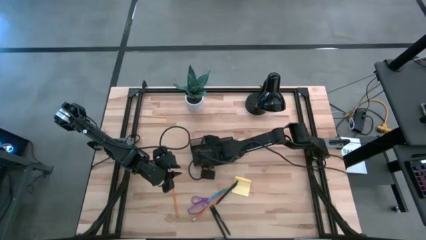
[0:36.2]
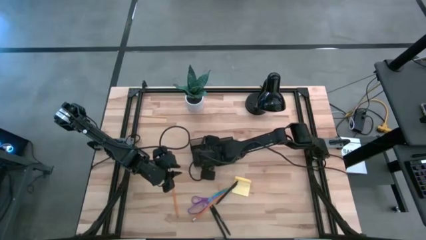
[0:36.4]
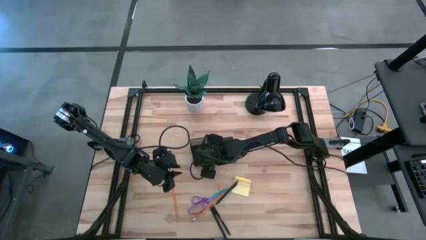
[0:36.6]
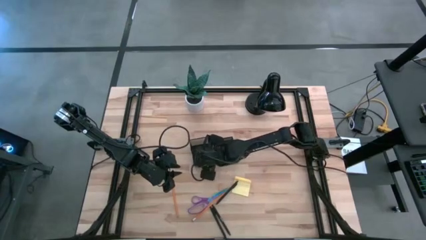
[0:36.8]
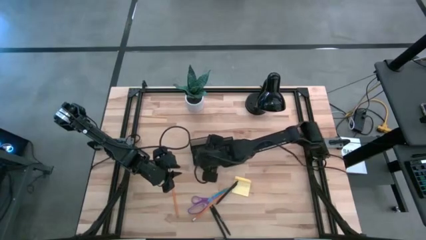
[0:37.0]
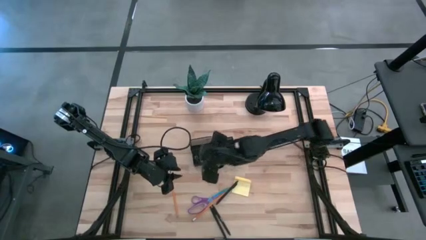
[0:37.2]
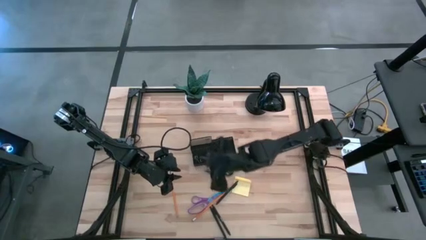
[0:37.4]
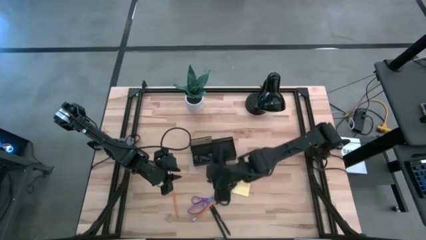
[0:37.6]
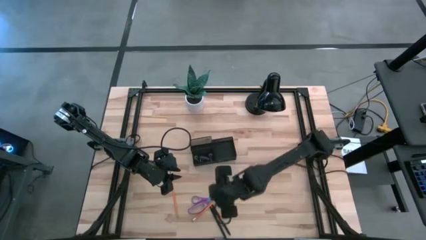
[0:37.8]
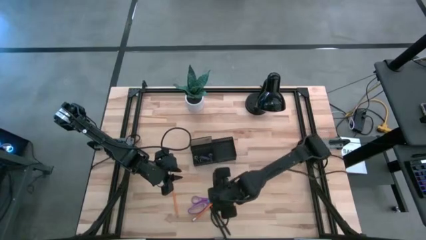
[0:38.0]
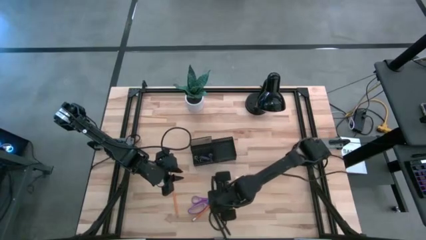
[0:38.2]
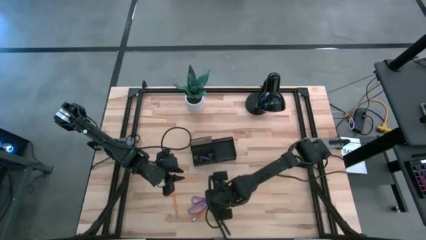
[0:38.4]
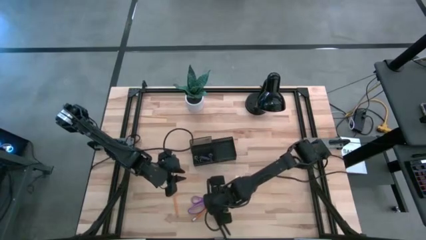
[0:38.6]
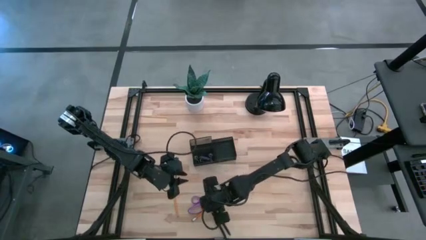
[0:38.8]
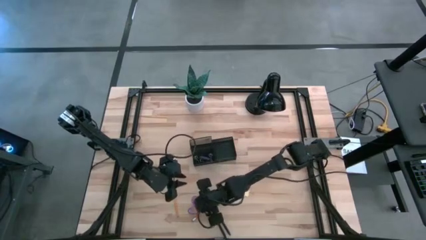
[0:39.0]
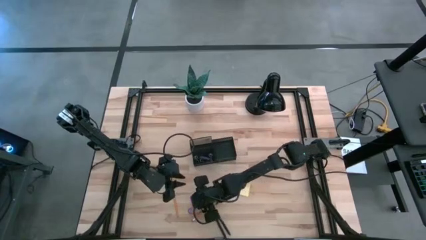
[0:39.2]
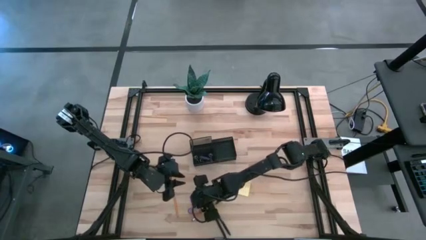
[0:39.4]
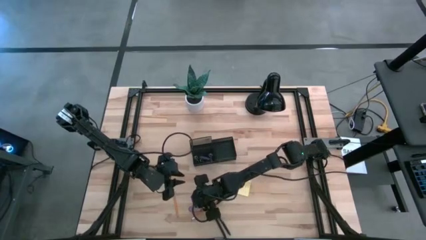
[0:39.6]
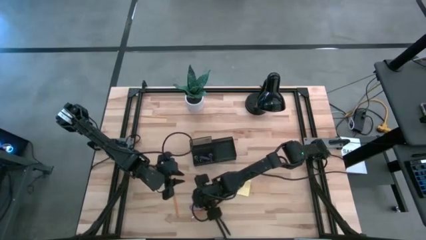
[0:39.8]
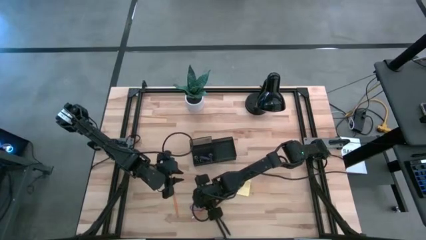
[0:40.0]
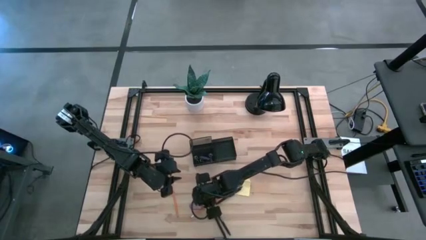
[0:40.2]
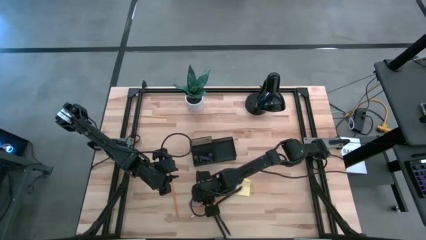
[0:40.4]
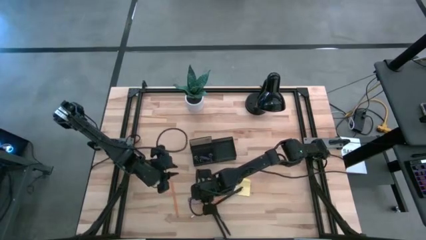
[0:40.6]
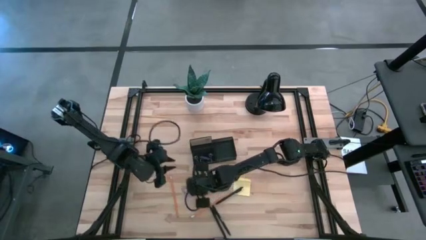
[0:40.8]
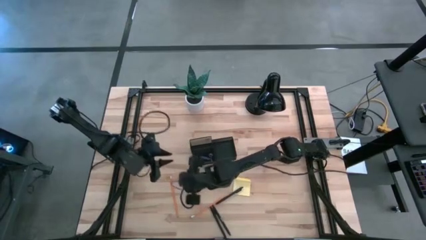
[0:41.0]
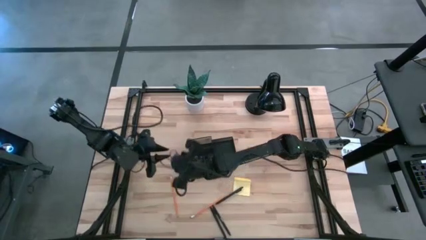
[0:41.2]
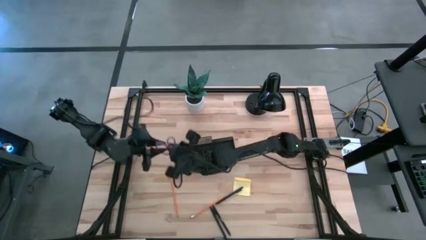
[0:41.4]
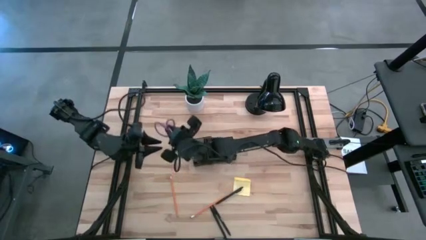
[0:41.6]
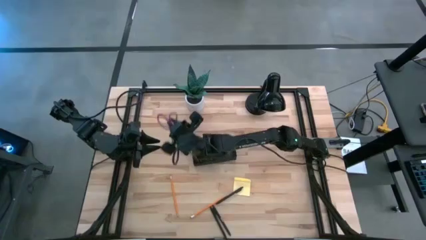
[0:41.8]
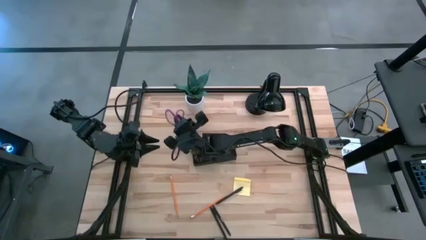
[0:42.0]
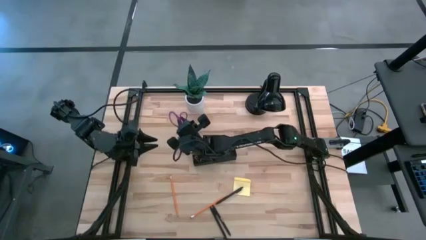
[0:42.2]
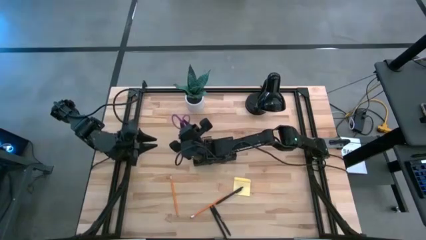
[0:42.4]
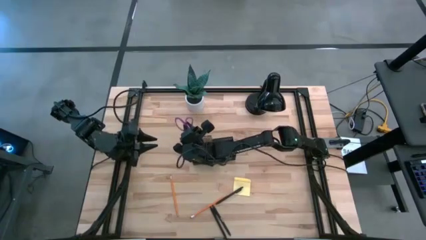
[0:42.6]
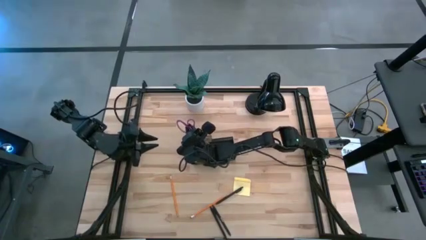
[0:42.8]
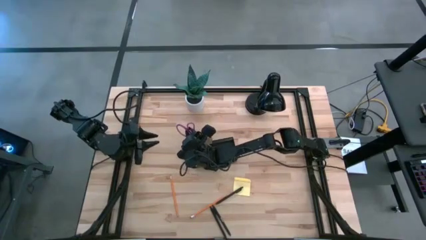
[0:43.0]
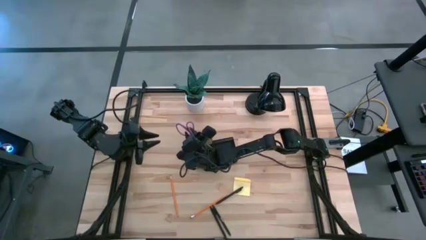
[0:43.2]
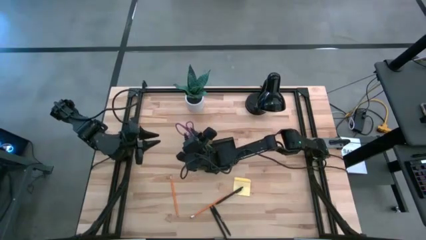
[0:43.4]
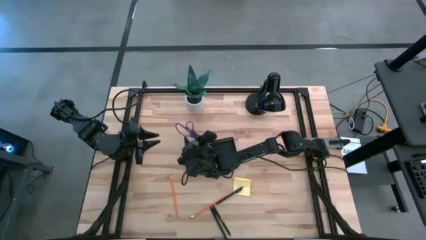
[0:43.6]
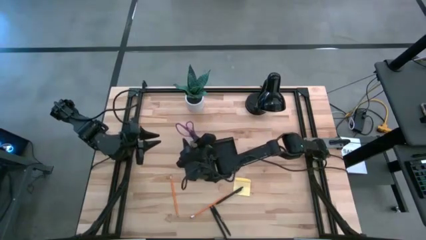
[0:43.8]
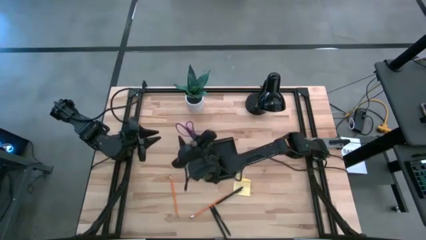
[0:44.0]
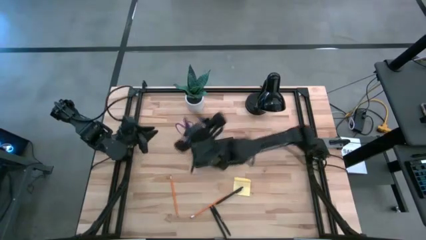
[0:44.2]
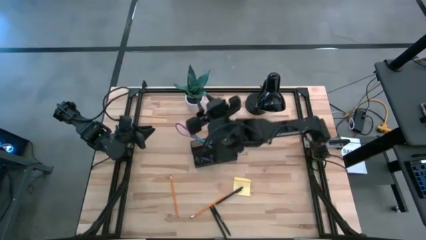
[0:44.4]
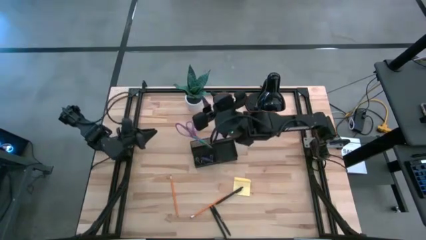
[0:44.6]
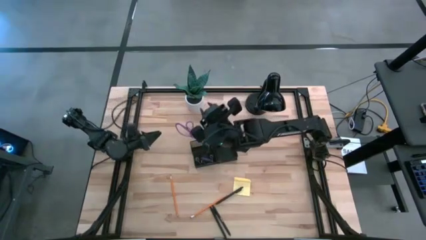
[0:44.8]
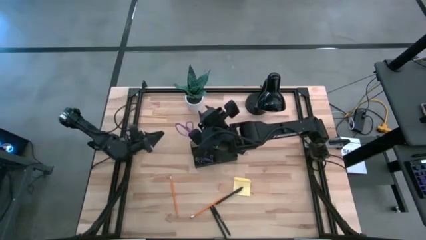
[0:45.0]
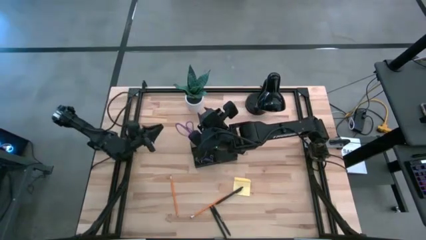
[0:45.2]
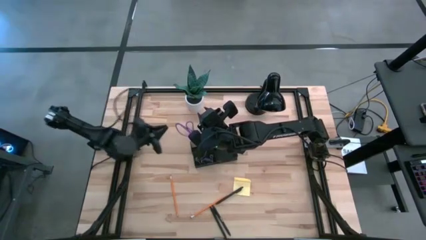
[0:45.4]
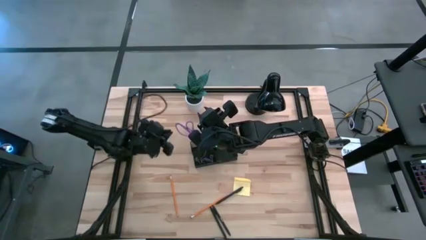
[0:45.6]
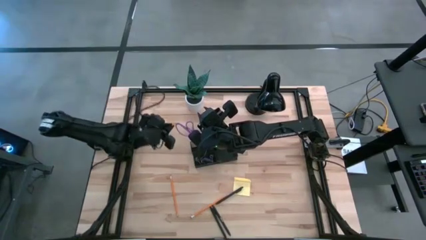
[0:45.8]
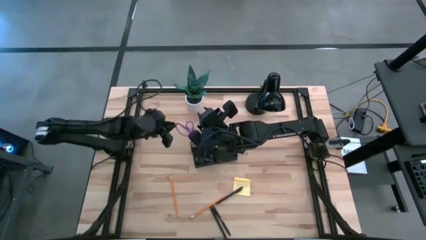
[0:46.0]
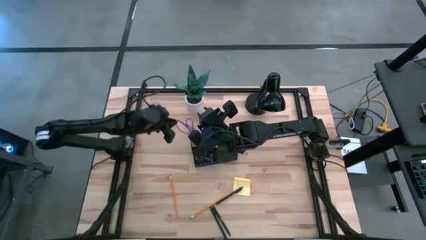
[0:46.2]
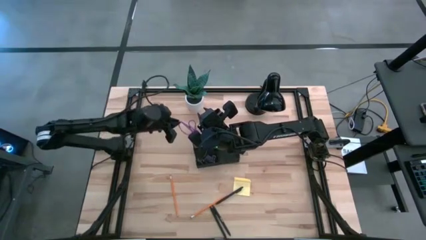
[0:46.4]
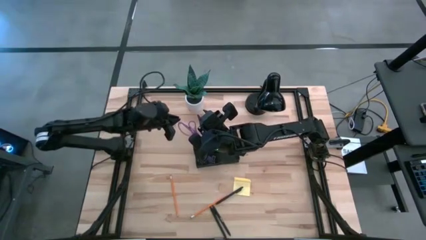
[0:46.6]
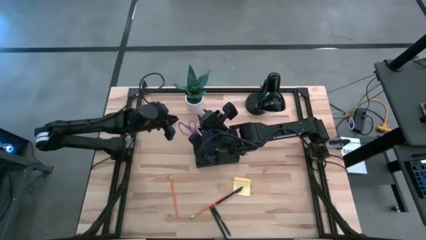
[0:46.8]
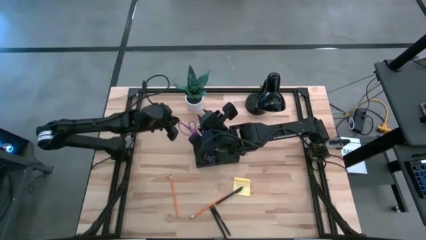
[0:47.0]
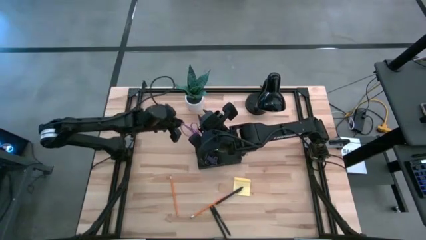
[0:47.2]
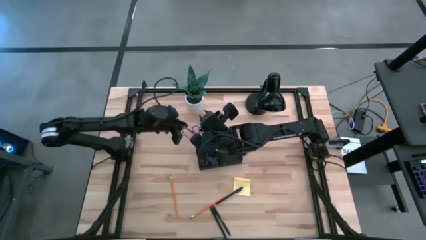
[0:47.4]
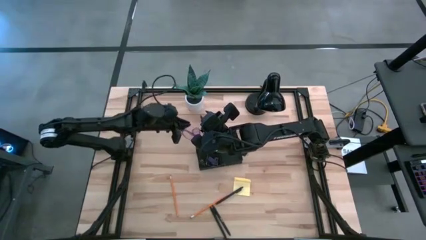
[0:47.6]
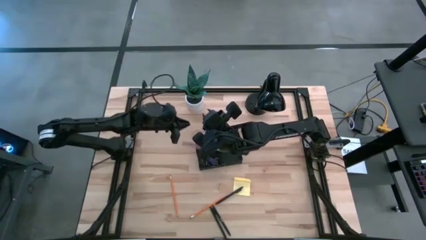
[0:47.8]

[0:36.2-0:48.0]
Task: Pick and place office supplies into organizer
Put the scissors into the desk organizer

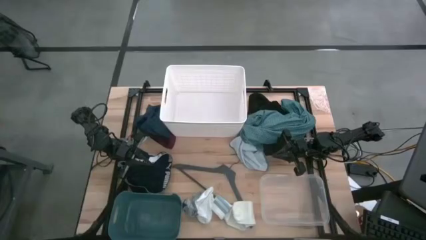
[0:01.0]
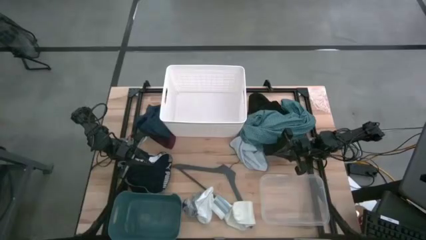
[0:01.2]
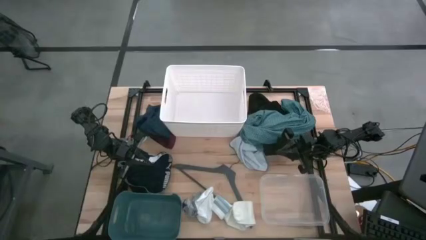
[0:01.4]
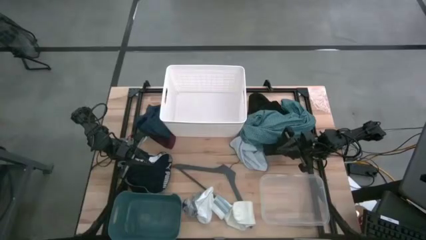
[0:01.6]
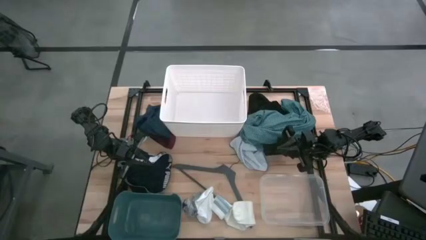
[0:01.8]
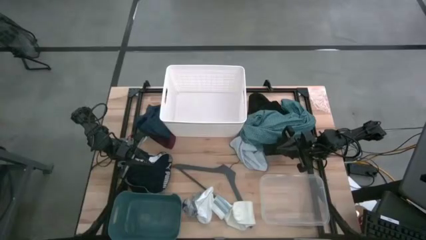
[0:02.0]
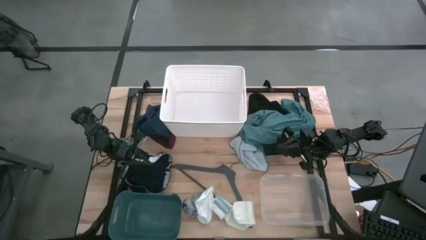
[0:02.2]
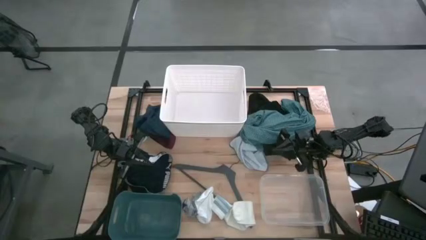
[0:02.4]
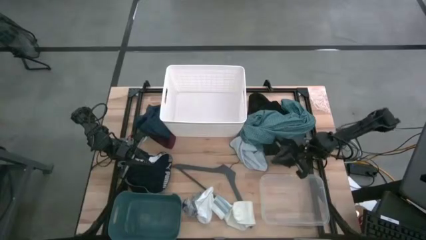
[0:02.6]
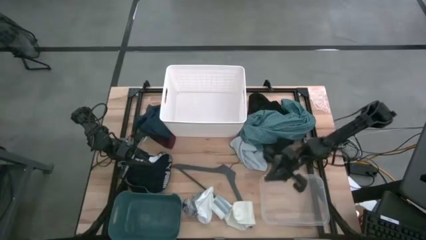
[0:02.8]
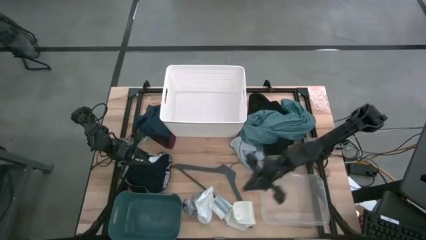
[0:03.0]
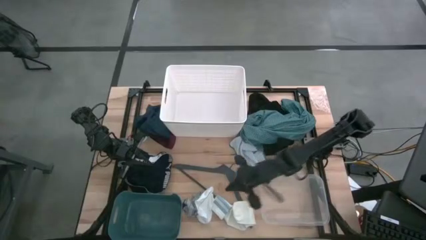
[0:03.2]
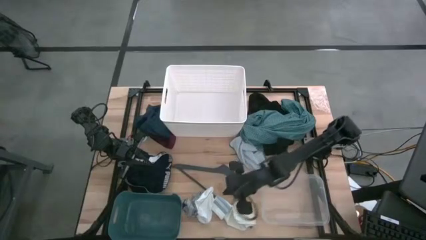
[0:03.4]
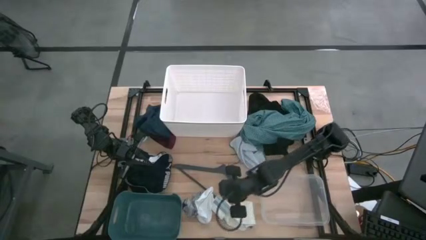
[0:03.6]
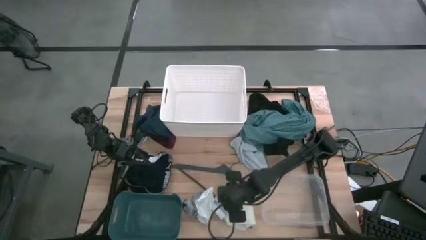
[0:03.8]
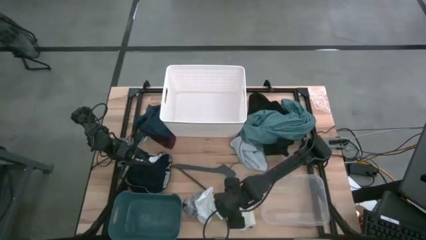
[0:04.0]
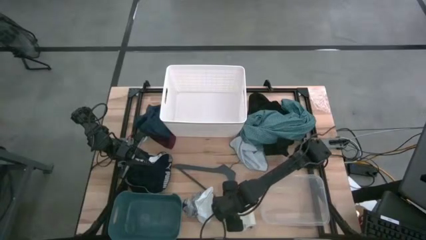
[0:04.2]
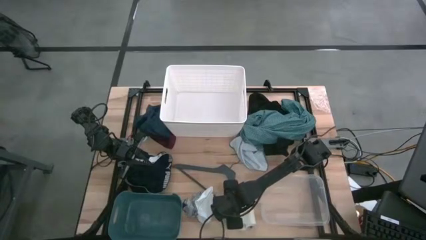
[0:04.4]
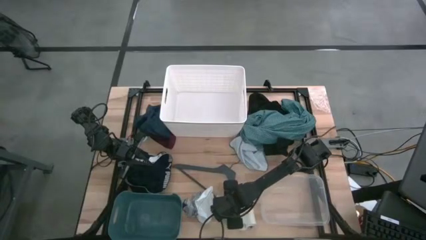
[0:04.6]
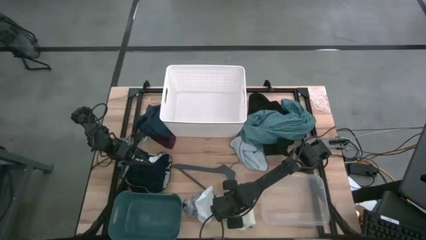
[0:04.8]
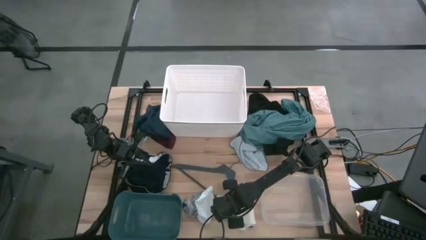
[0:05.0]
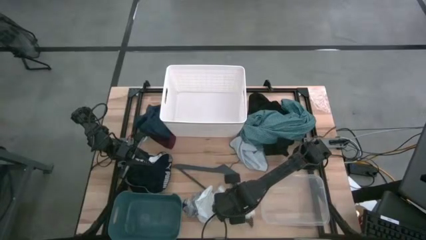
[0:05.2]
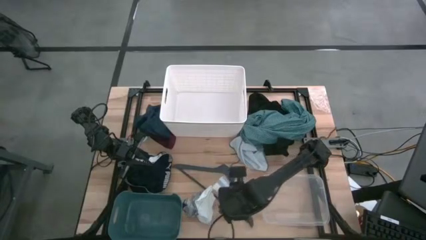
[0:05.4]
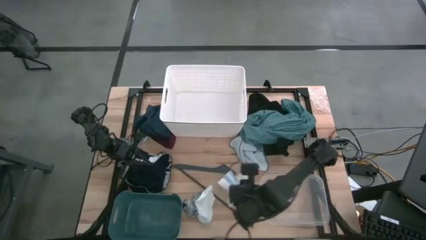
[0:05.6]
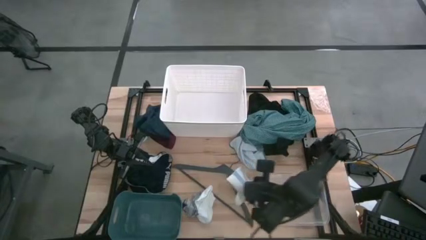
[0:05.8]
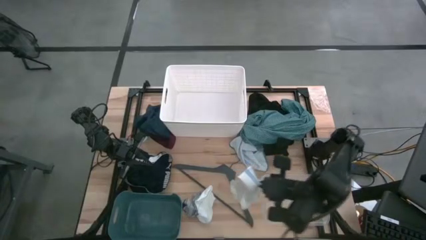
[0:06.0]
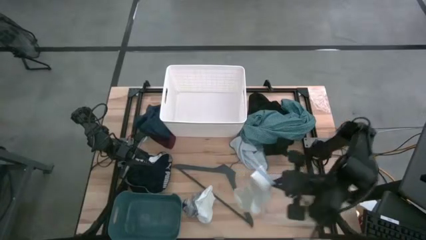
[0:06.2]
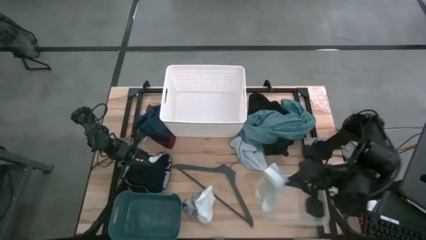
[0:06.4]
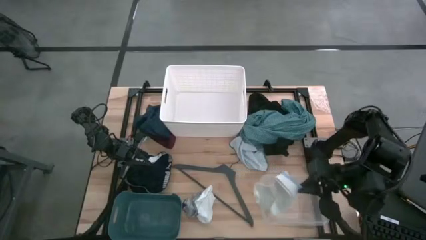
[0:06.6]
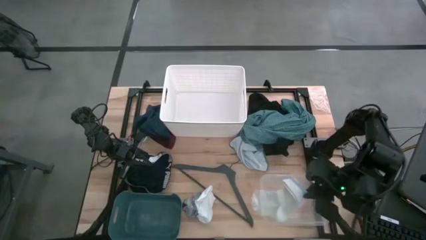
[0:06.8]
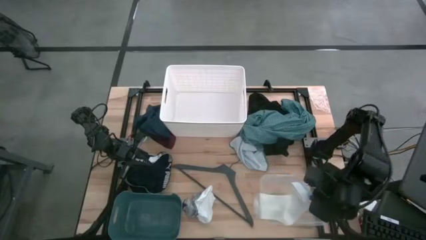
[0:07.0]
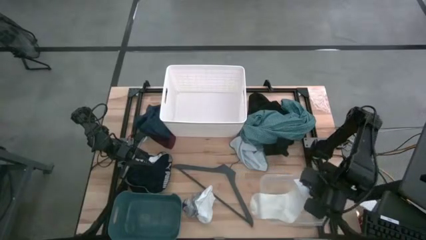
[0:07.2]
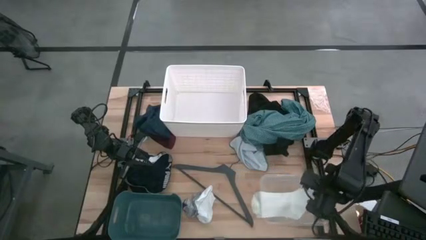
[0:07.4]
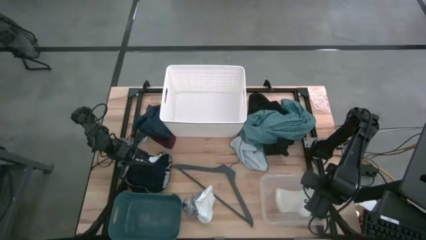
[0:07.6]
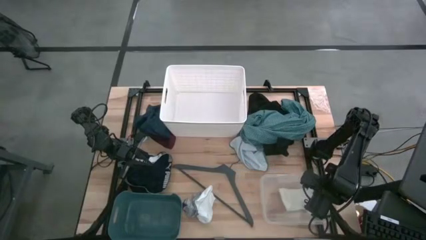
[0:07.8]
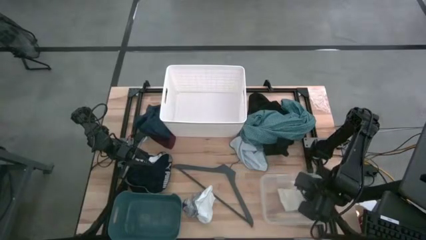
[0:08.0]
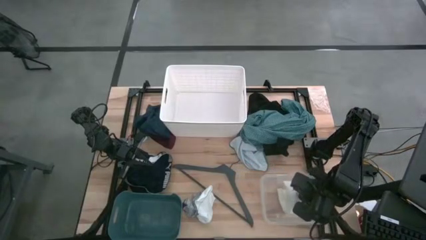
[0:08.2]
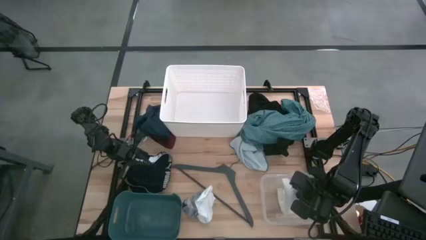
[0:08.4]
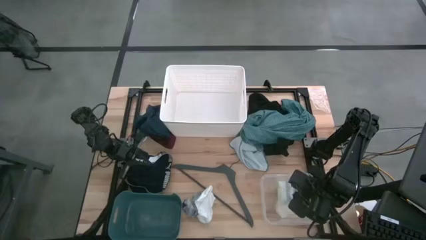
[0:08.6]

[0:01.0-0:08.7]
Task: Pick & Place Cloths
Put the white and blue sock into the transparent bin
